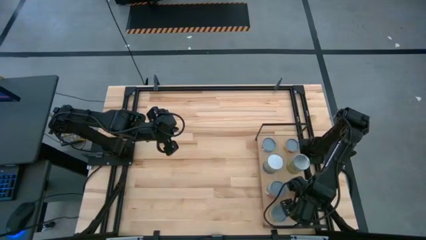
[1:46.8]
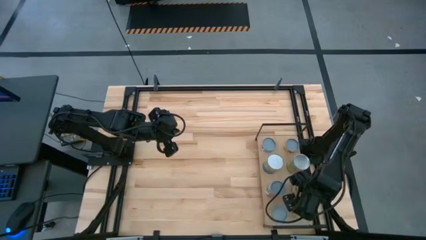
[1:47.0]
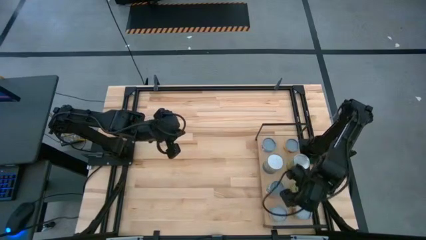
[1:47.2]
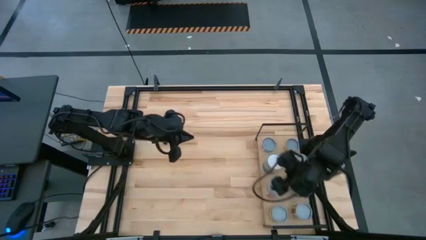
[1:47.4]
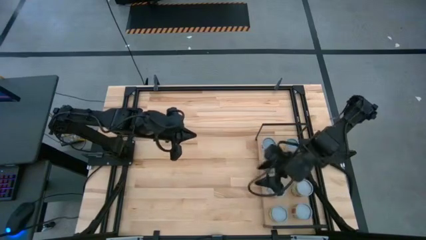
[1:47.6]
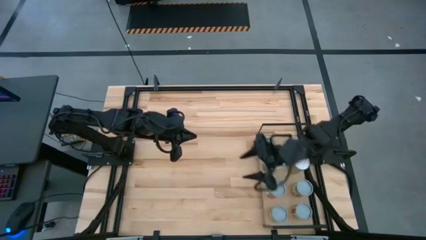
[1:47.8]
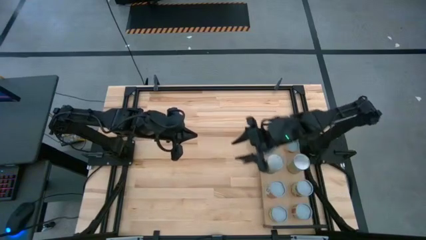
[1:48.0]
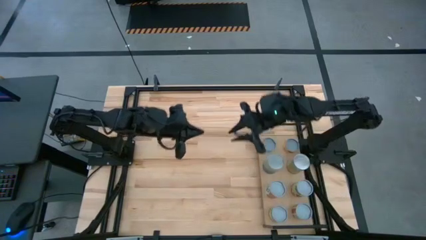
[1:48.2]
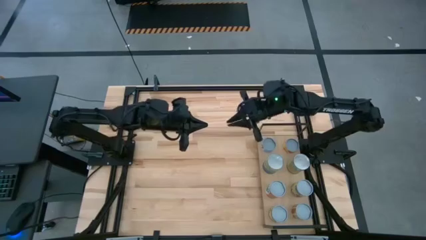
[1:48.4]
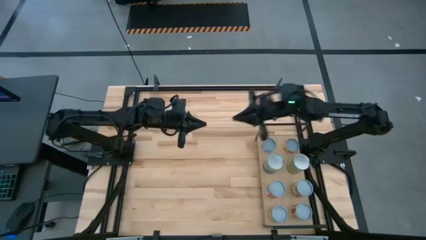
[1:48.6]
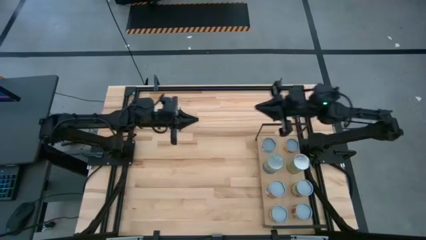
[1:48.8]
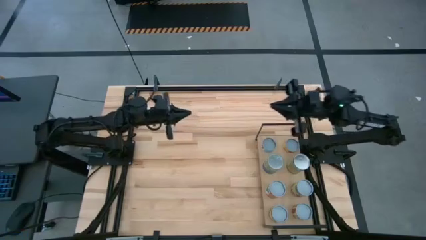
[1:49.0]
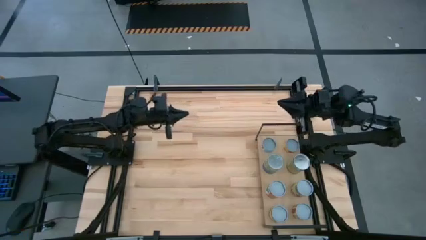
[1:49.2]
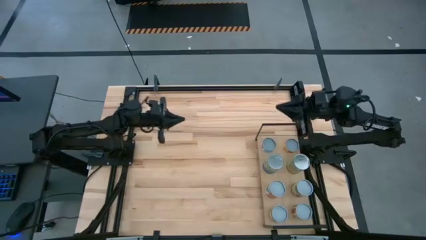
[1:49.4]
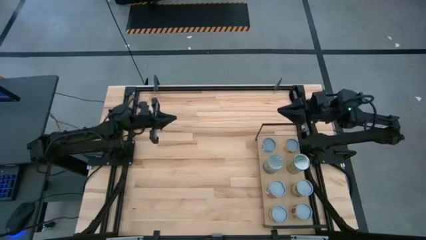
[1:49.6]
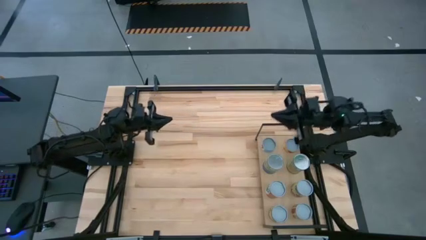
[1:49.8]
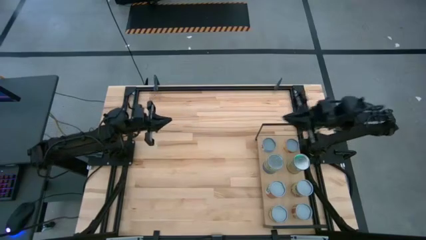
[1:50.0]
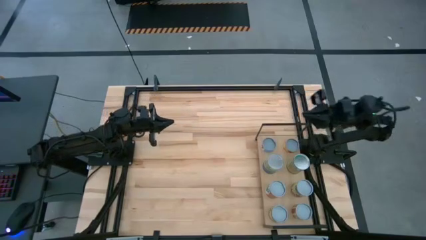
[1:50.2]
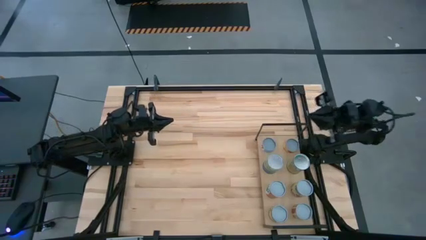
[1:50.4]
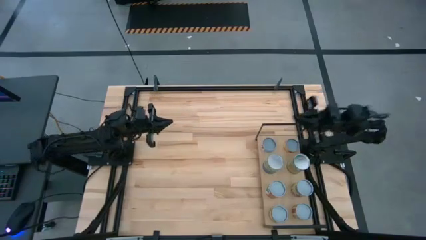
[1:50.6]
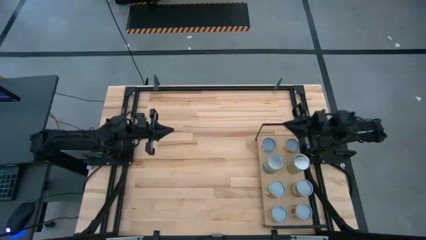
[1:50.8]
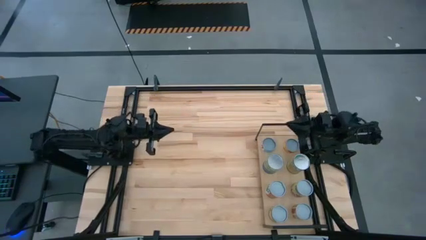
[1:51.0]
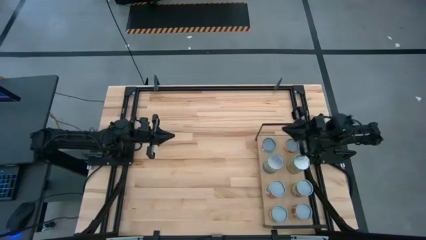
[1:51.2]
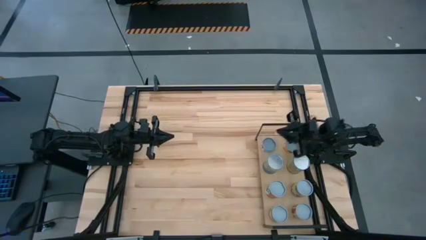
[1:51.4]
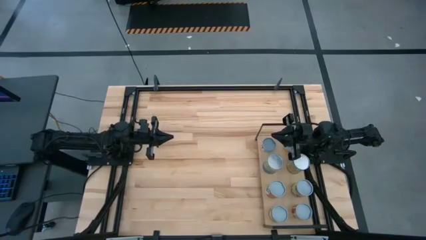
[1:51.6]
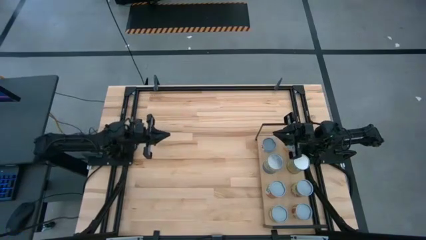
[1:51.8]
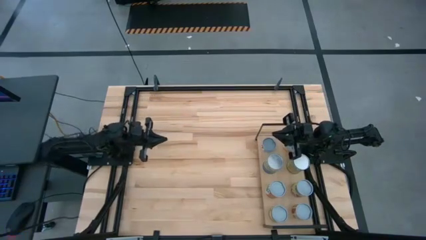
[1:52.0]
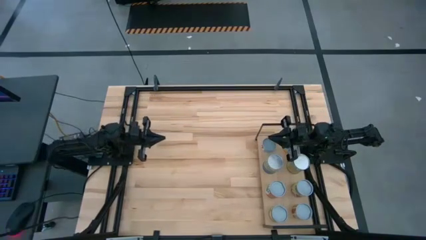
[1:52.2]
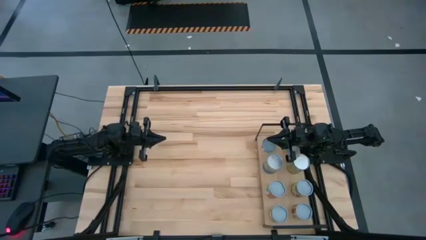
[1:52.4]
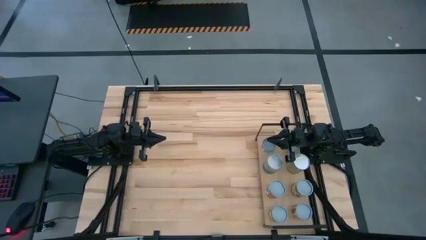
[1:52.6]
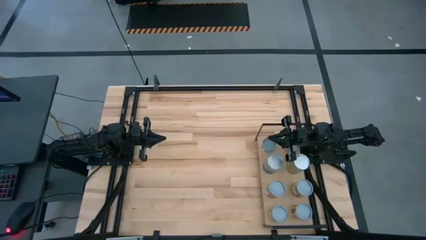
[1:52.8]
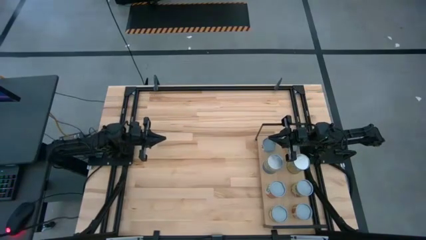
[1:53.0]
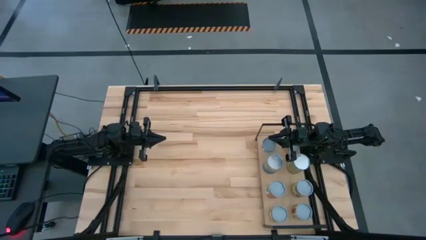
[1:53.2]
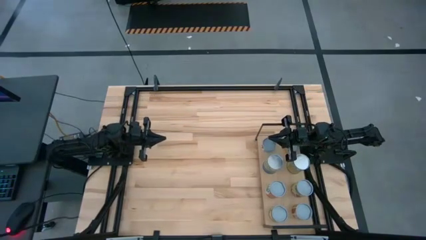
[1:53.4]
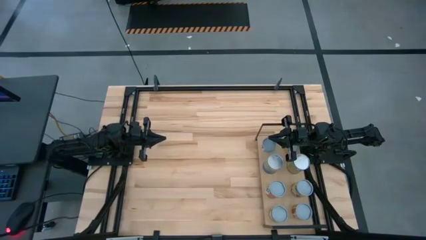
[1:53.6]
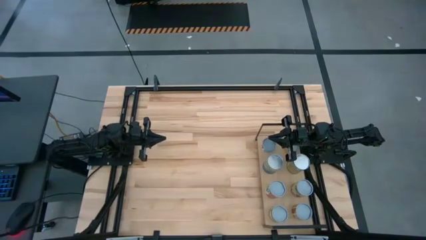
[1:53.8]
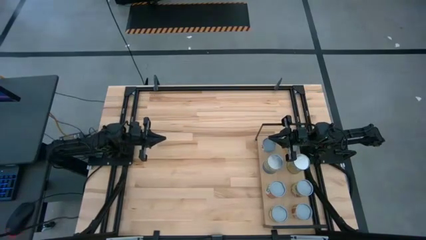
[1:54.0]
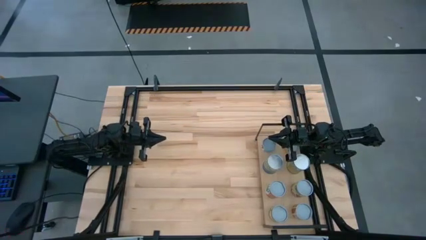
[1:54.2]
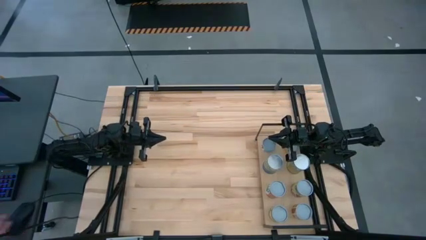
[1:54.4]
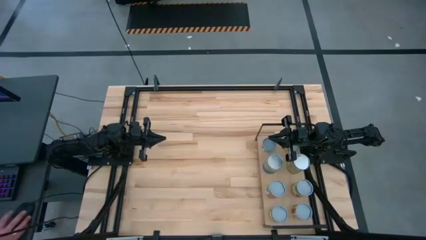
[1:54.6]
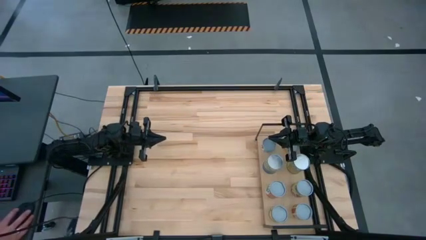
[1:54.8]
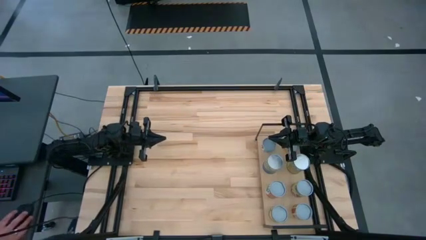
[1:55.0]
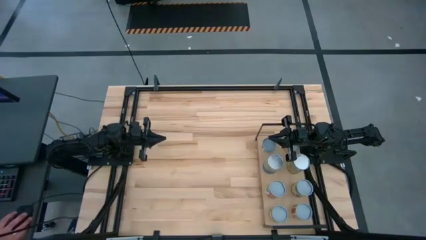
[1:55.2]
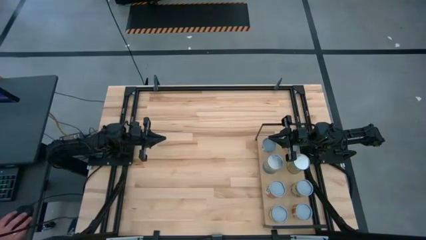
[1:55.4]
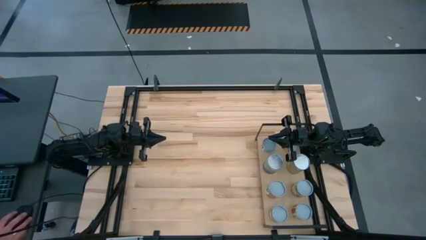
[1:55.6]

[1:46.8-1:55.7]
Task: Pick and place cans onto a shelf
Return to Home Position

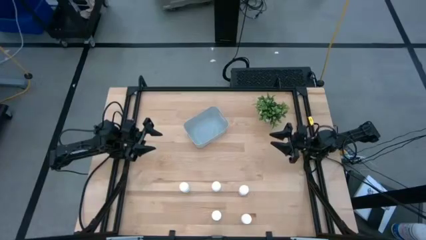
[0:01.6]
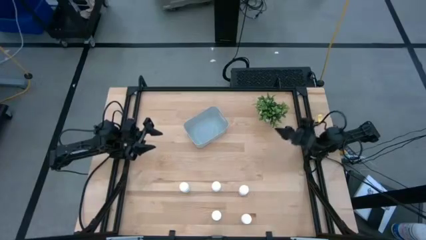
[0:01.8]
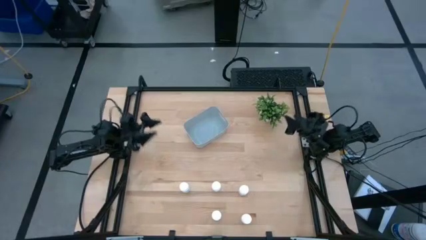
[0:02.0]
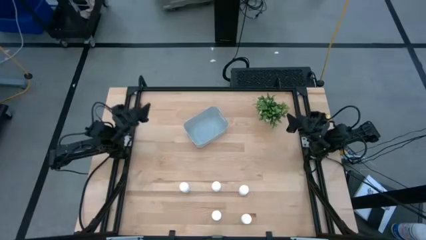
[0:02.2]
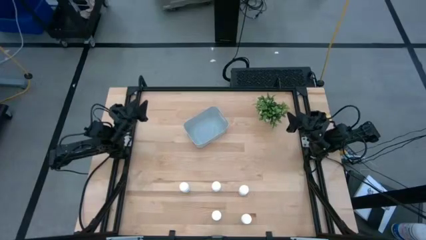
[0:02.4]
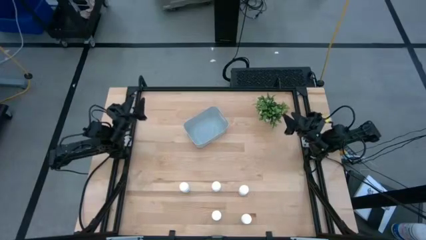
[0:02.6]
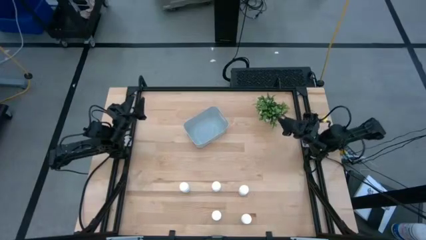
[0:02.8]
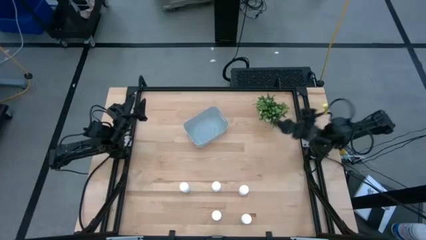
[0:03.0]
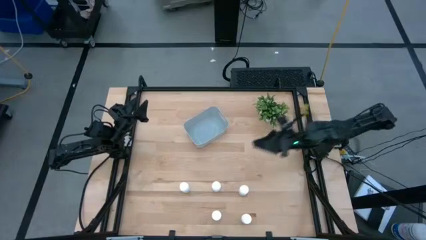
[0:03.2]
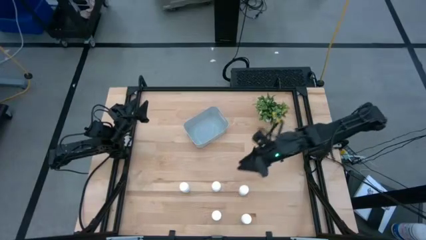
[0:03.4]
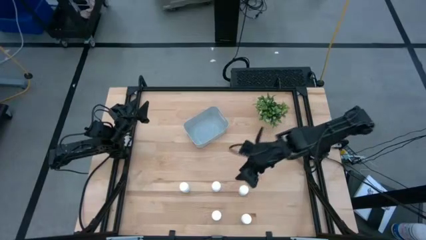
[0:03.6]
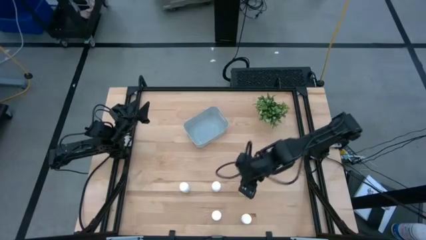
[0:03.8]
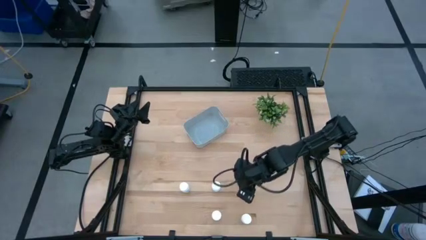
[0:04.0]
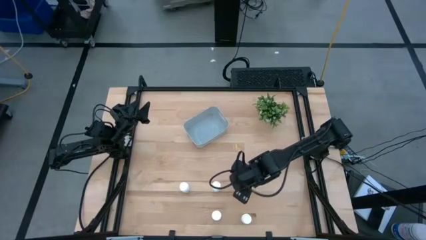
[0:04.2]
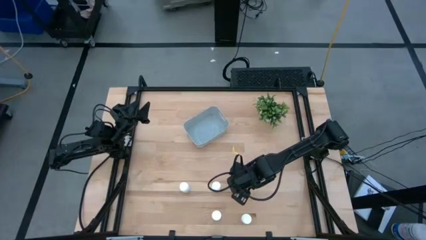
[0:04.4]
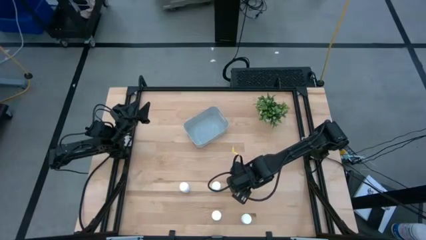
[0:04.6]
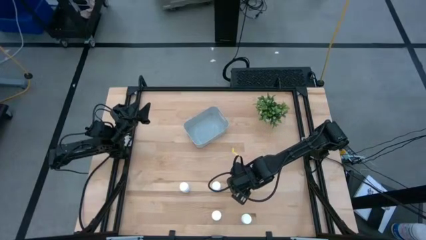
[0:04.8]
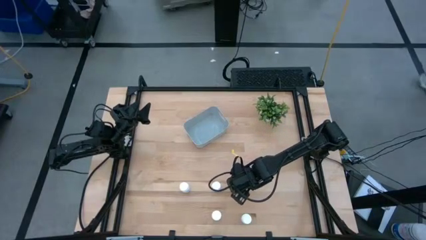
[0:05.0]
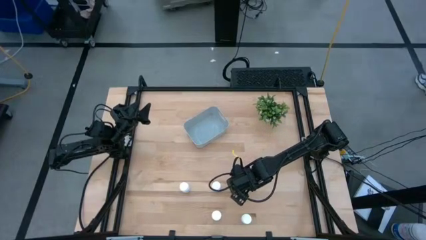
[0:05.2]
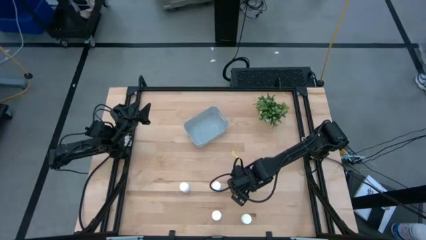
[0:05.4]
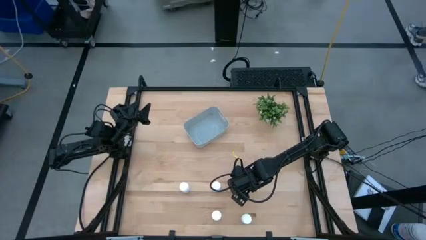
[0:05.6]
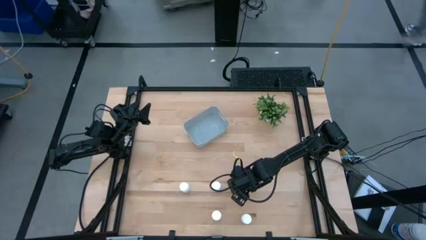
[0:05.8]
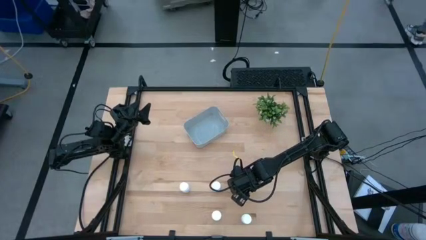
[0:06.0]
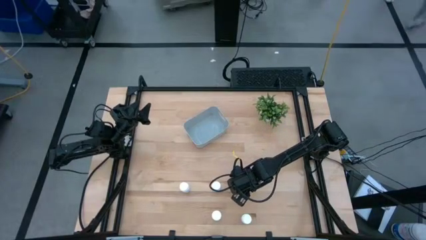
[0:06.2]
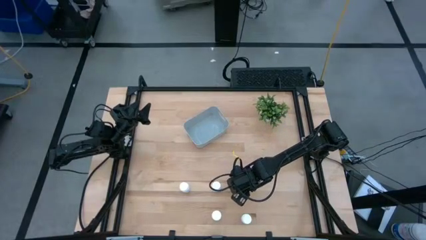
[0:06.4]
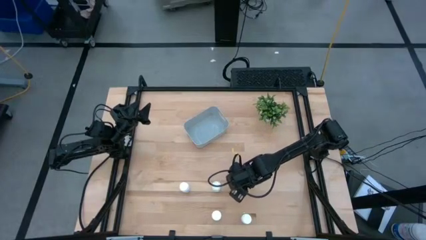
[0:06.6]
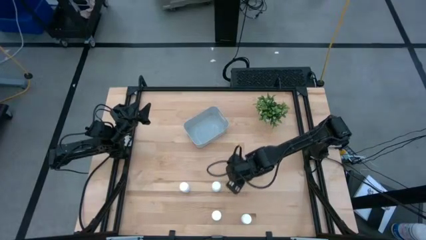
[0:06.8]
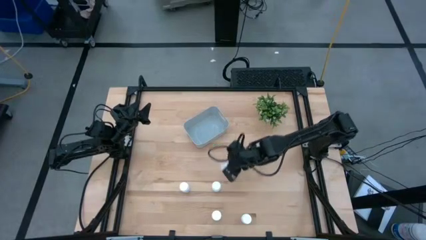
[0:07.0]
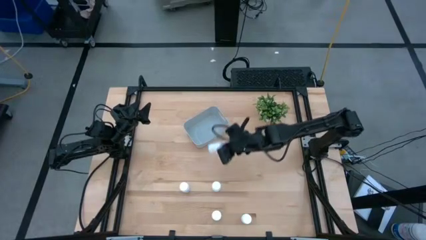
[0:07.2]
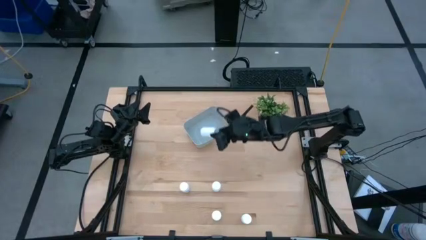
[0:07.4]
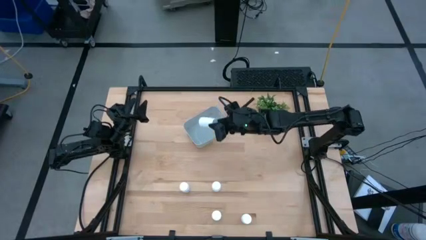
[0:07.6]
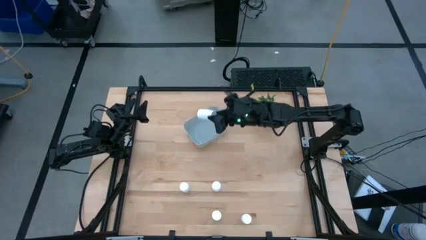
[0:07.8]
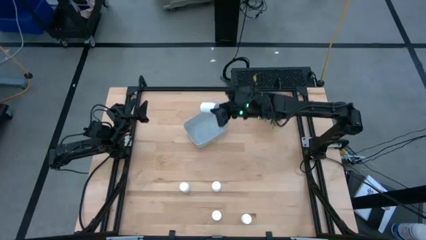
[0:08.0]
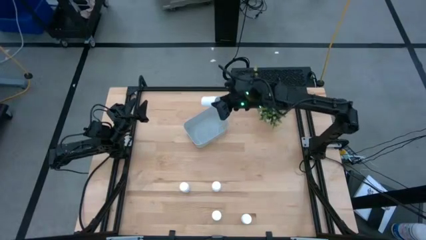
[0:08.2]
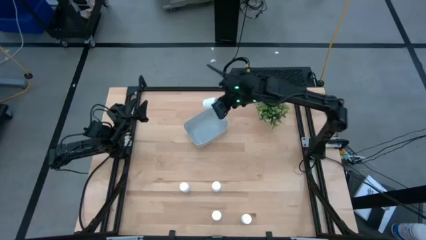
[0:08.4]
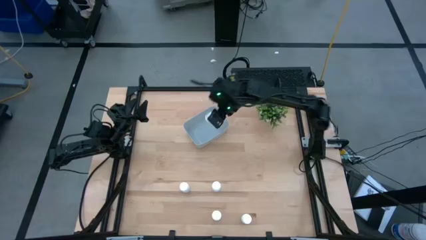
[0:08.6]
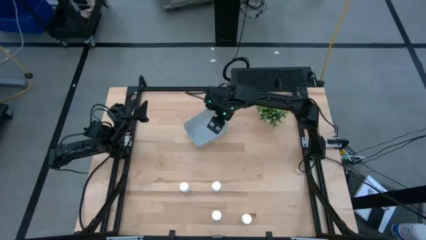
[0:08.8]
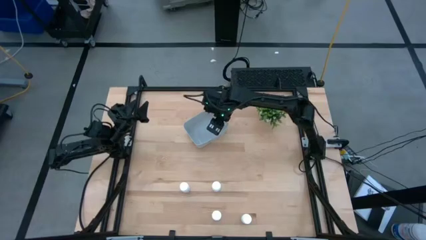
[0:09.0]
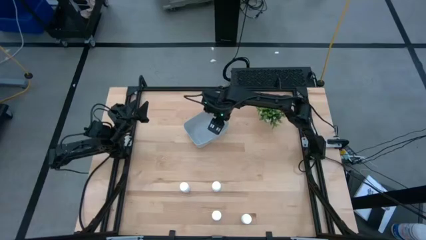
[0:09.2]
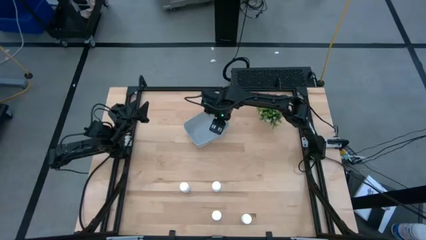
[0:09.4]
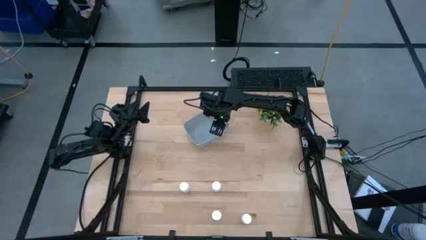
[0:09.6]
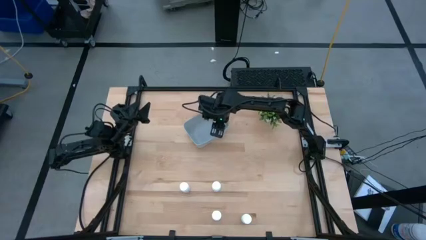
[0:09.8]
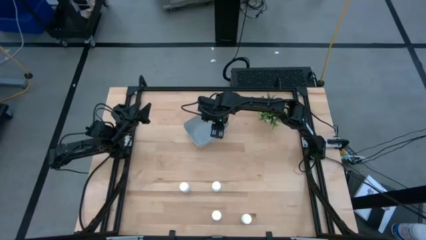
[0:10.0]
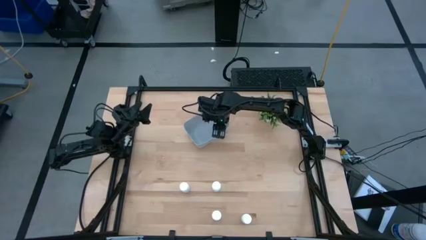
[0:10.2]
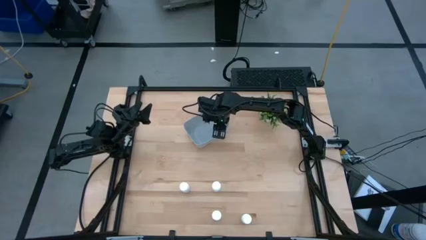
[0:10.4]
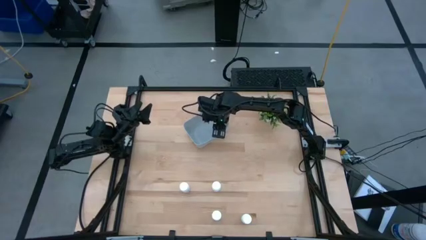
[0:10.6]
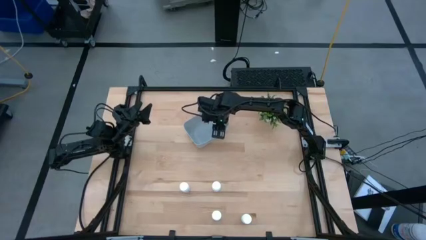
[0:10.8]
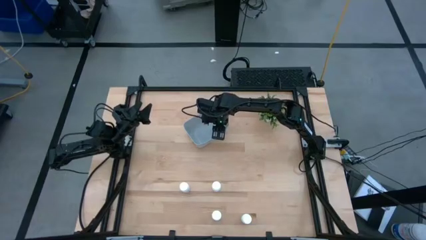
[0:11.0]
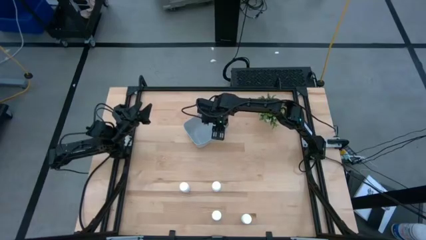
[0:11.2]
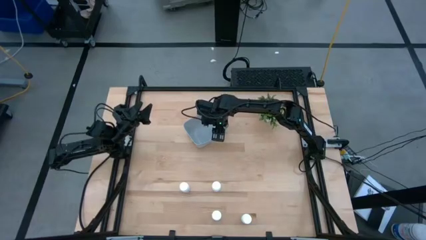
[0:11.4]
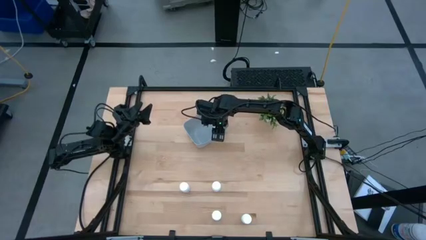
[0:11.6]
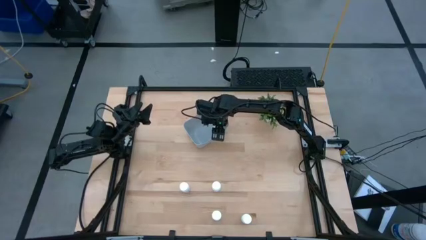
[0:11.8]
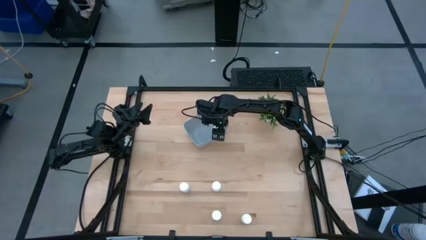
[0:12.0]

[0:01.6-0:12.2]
Task: Pick and place pill bottles into a basket
Put the white pill bottle into the gray bin
